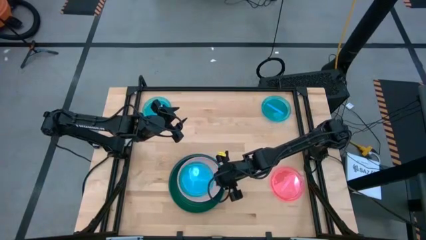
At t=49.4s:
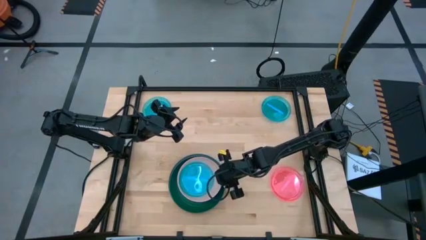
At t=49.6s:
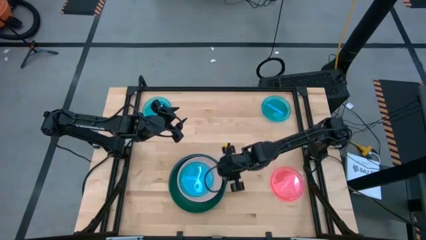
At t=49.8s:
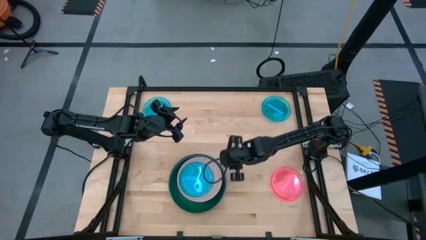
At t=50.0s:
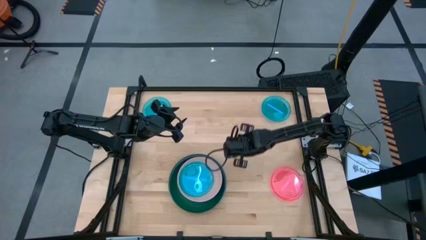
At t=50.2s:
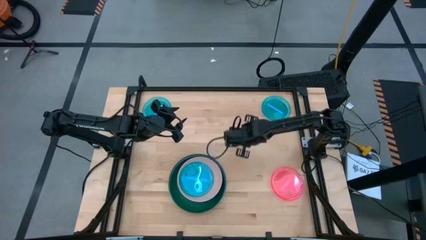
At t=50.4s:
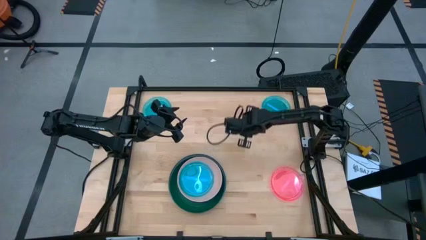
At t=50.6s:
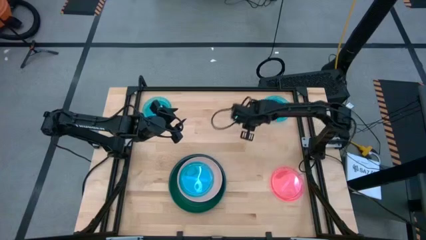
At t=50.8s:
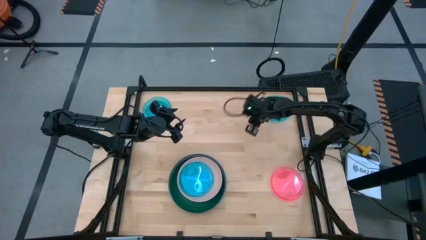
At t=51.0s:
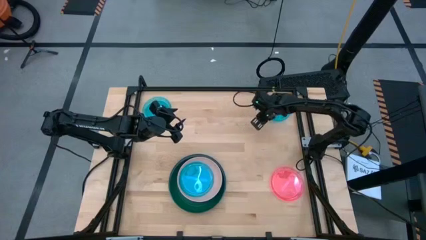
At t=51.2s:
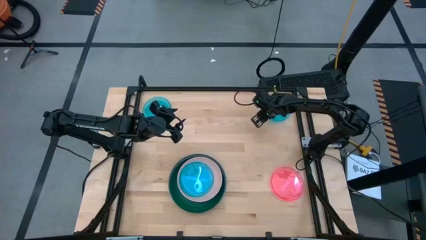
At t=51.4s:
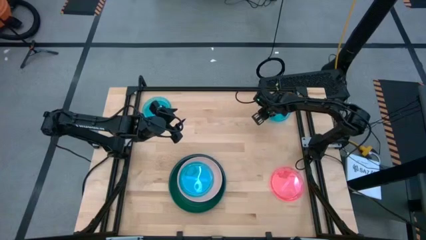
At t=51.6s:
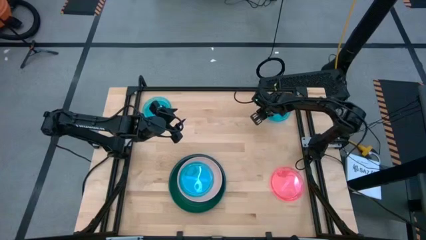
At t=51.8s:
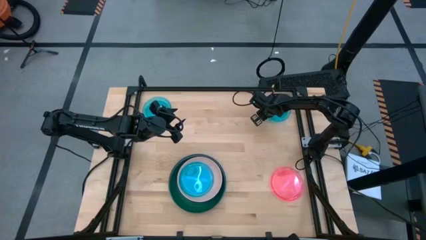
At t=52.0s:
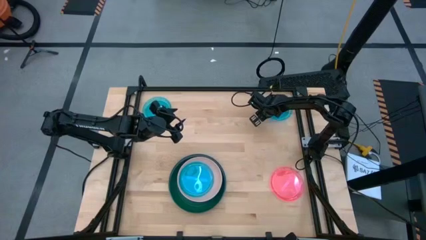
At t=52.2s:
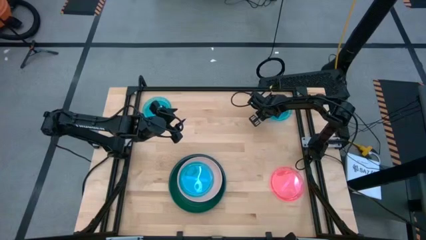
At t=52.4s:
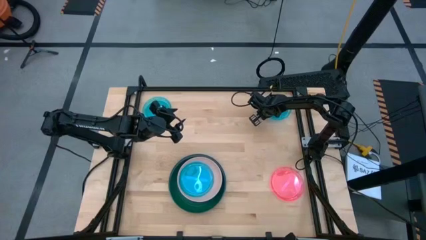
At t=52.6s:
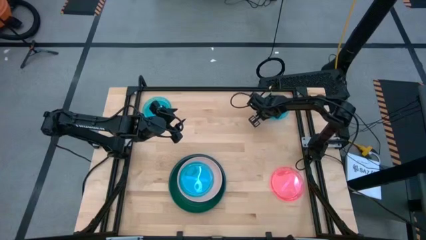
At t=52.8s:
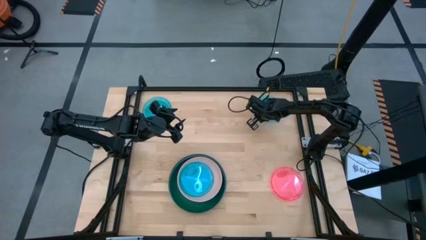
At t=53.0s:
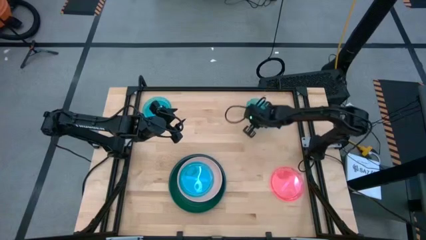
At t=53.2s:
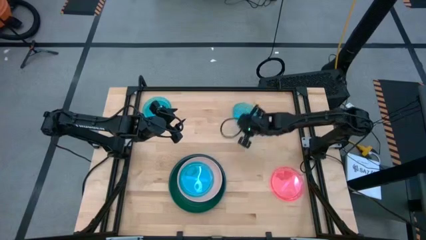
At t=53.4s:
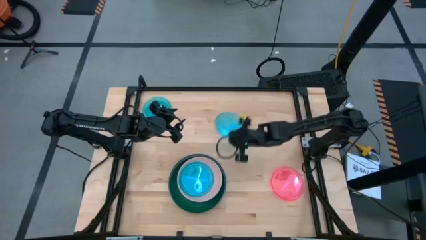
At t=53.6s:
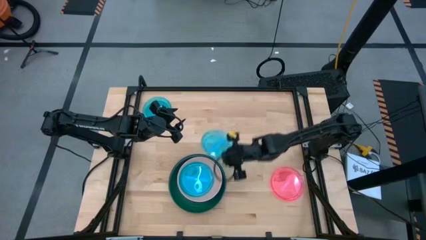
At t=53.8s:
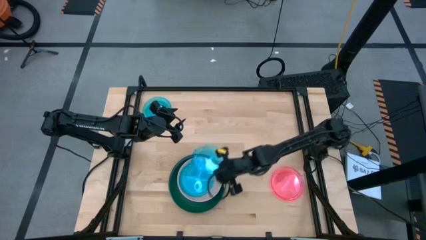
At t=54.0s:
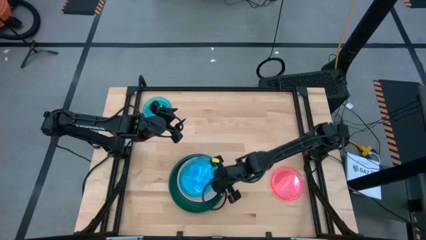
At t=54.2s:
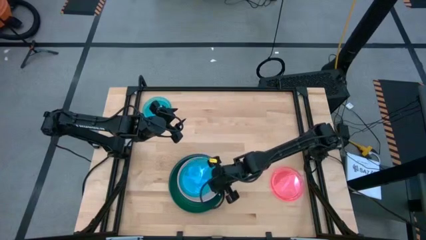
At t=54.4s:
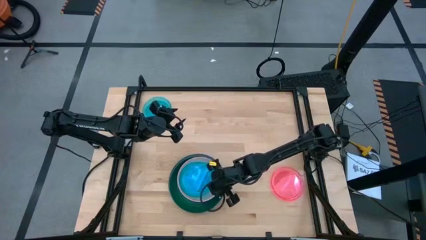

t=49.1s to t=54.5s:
Task: Stack plastic plates
Stack the right blue plate on top of the blue plate

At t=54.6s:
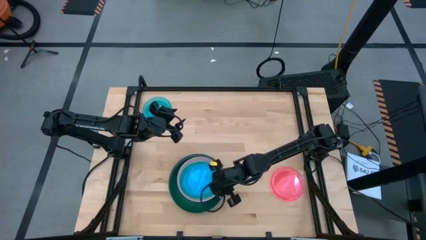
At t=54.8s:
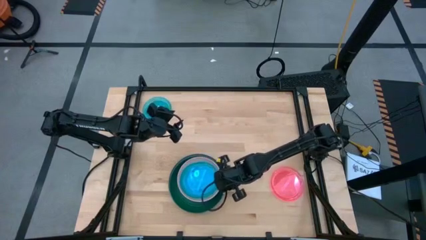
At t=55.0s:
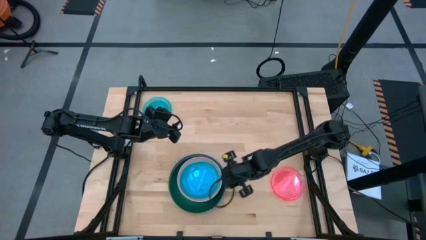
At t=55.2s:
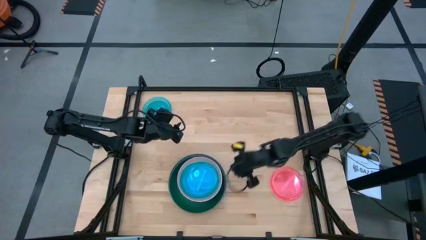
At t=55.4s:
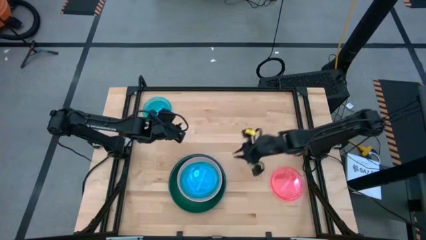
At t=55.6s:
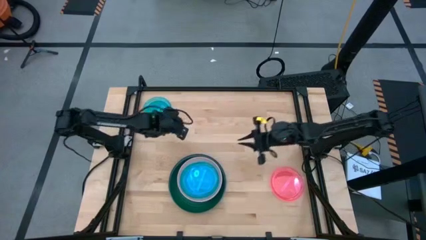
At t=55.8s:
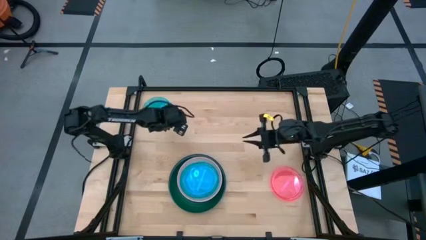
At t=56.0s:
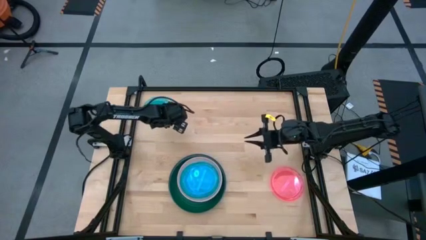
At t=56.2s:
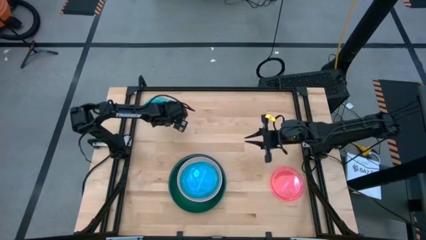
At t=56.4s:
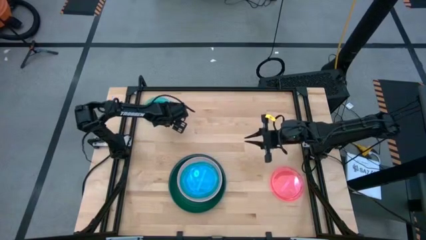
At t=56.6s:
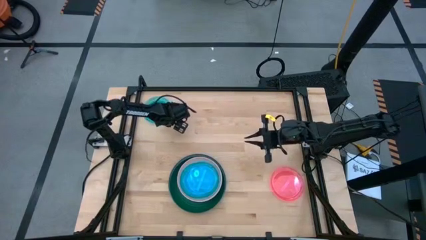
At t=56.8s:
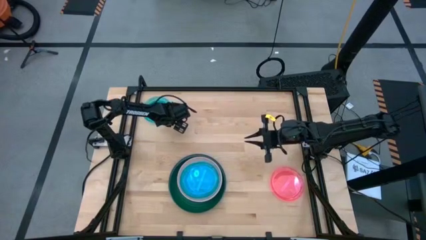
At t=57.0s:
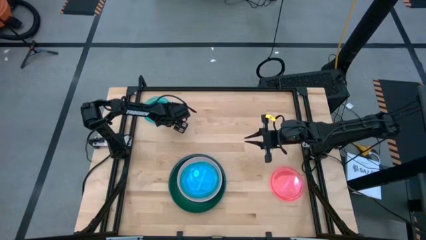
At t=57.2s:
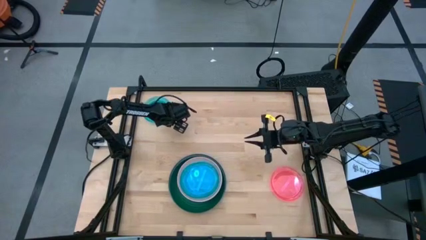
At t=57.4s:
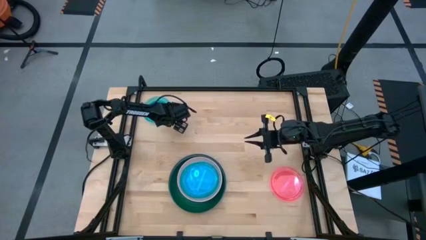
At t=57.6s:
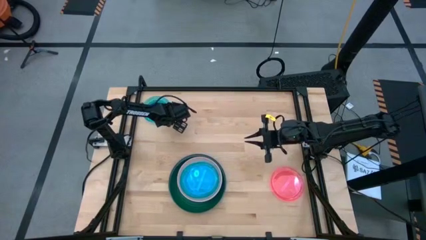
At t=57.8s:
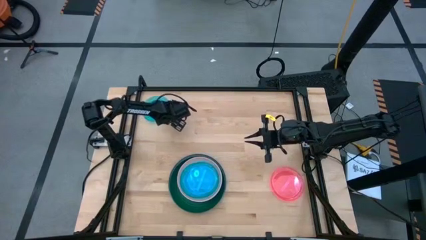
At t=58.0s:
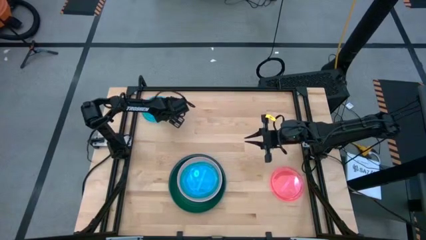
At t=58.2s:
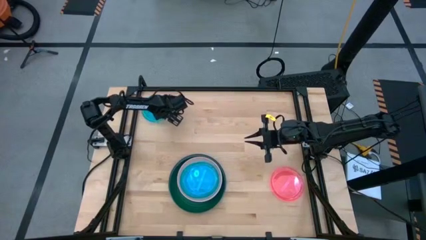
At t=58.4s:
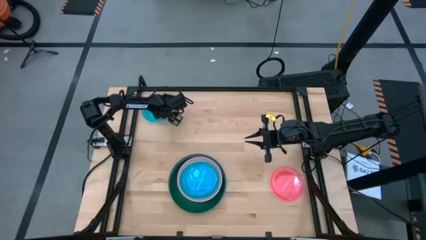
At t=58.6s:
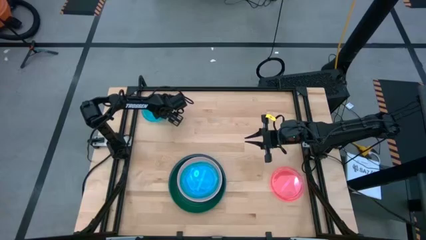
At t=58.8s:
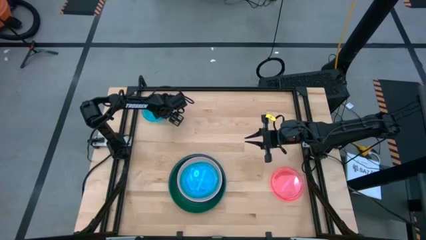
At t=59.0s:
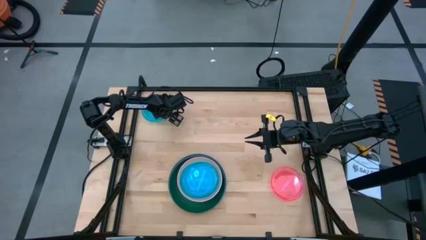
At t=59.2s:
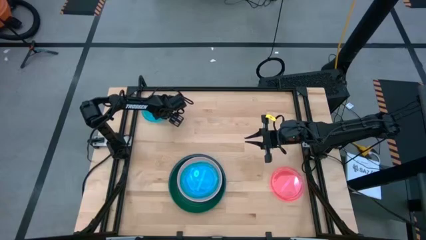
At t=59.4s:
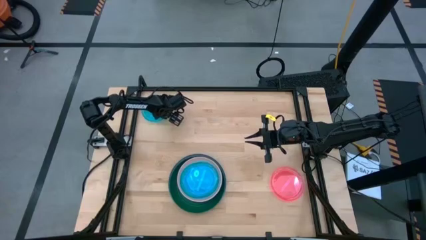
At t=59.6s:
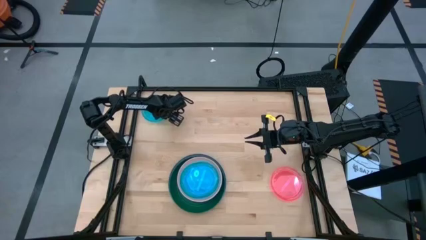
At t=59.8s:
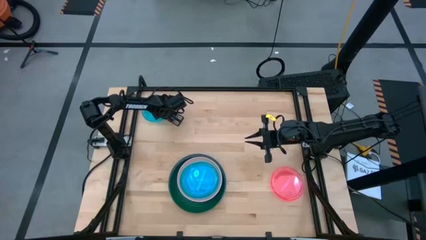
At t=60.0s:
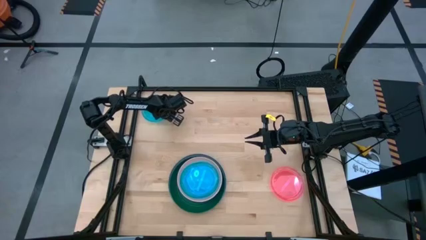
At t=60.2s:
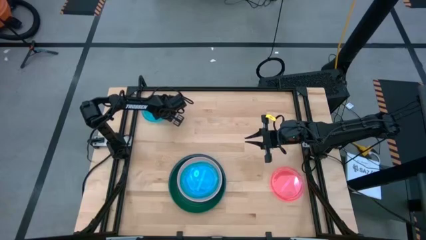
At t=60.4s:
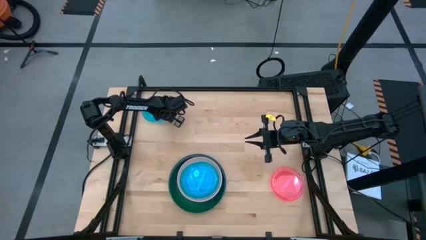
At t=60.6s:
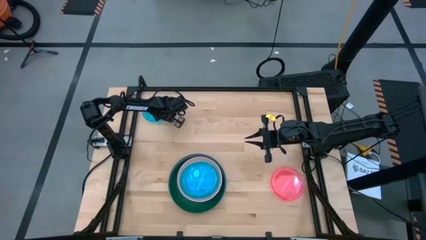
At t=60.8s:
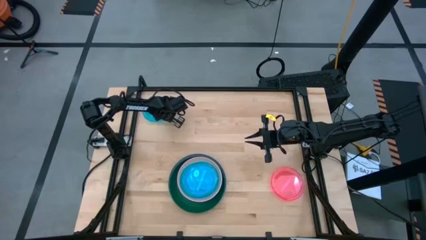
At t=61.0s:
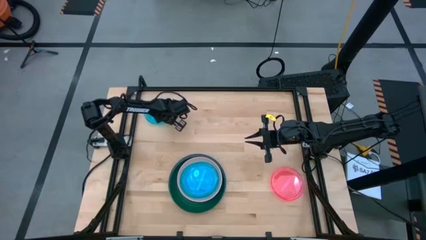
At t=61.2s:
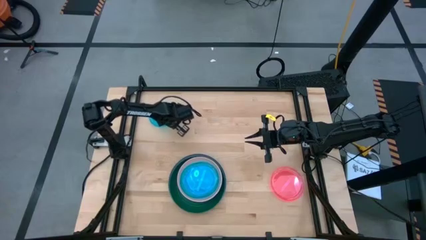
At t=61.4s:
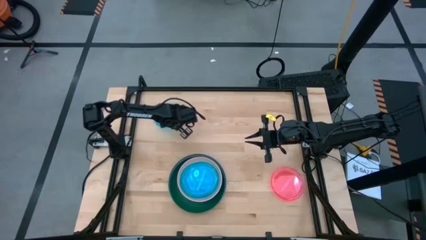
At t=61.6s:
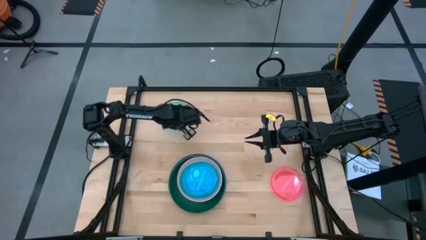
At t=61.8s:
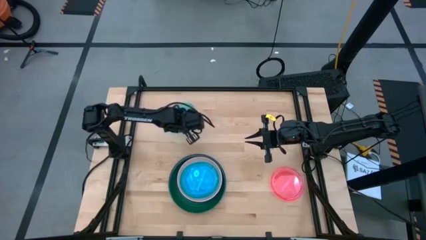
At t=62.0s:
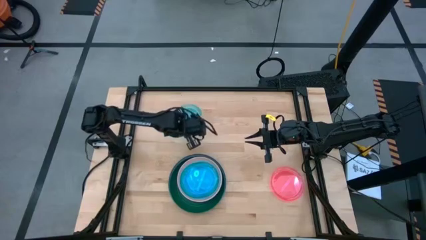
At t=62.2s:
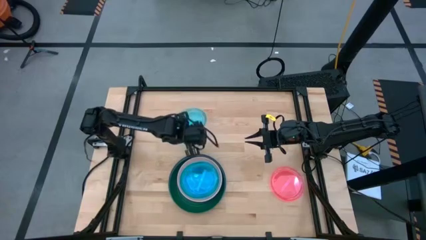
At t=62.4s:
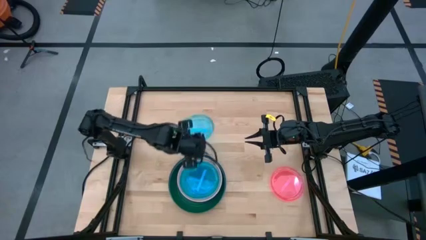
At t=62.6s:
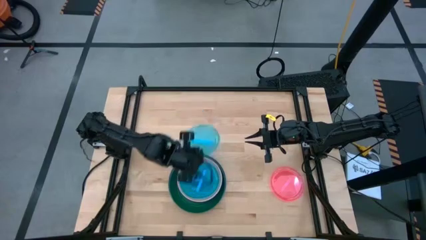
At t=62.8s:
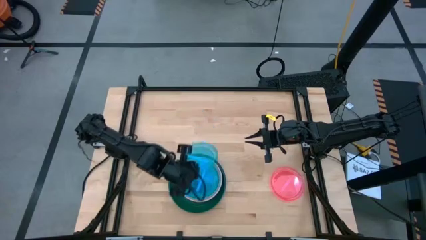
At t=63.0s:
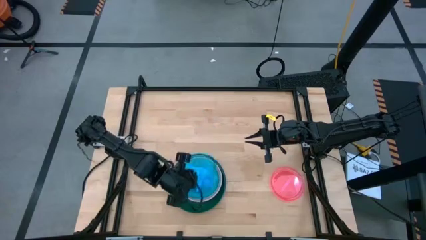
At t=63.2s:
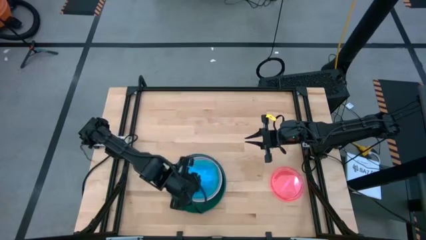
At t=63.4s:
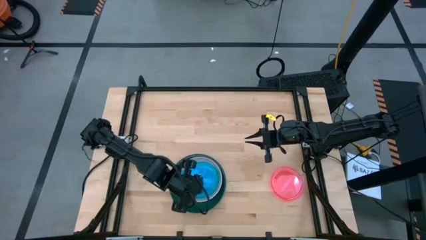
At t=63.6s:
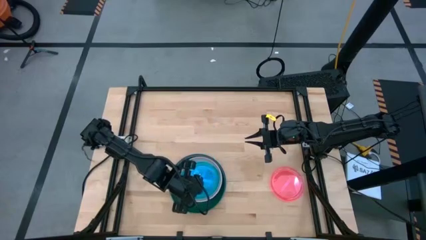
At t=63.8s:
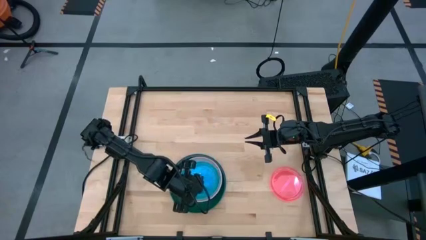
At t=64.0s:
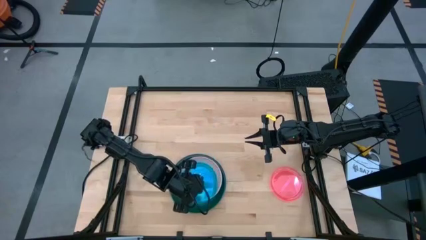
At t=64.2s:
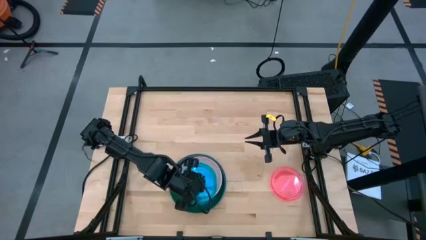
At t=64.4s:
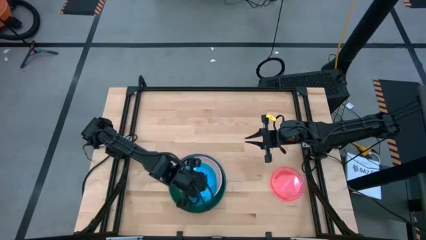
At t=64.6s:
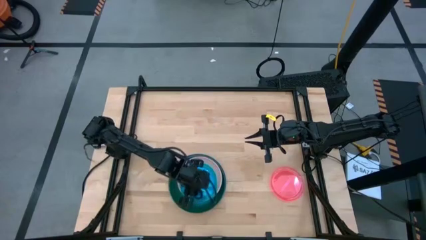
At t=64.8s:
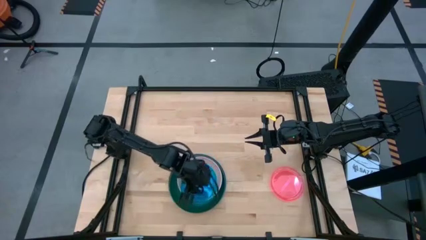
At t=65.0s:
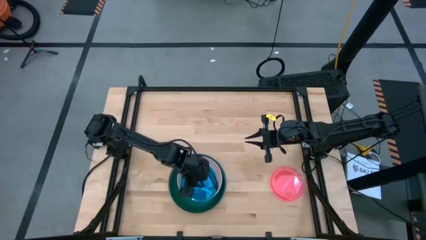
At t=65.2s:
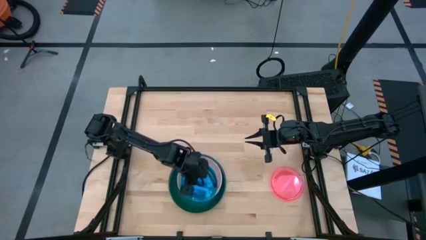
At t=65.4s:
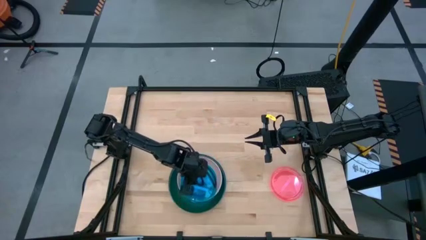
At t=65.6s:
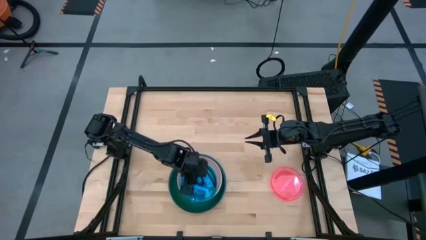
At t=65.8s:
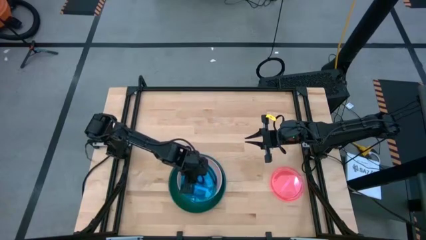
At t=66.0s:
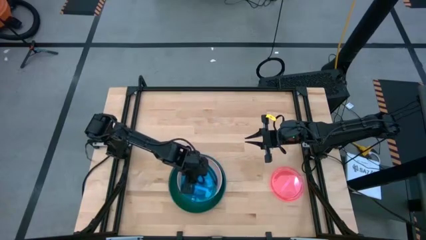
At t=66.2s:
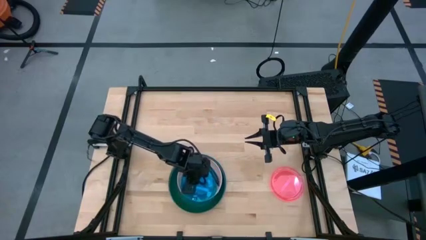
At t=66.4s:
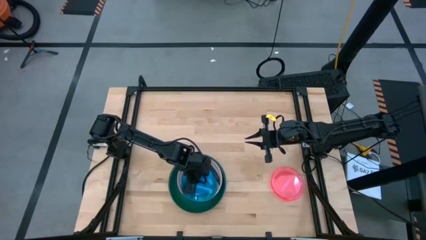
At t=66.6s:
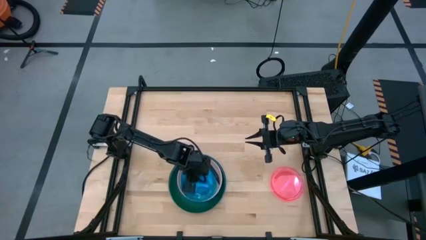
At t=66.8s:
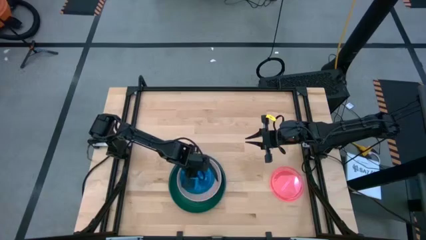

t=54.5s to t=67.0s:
Stack the blue plate on top of the blue plate
